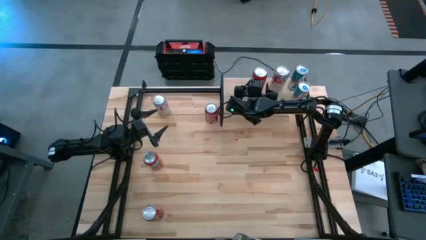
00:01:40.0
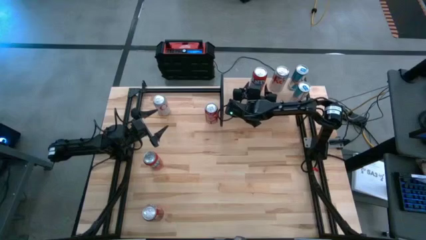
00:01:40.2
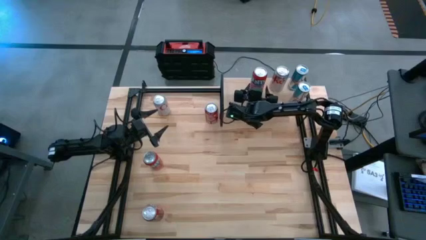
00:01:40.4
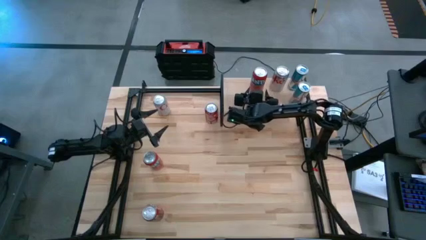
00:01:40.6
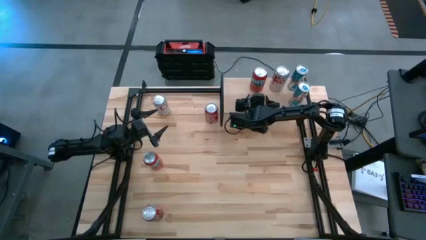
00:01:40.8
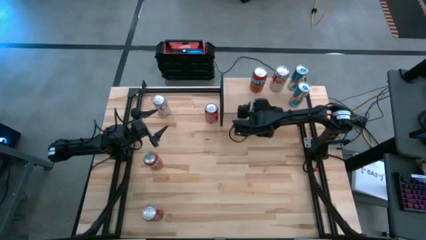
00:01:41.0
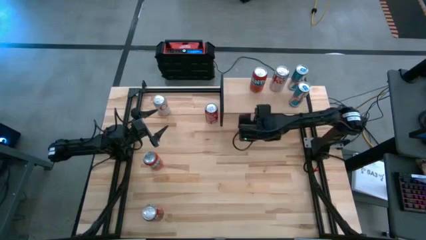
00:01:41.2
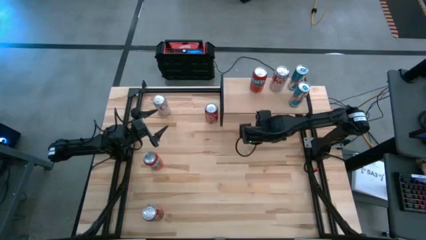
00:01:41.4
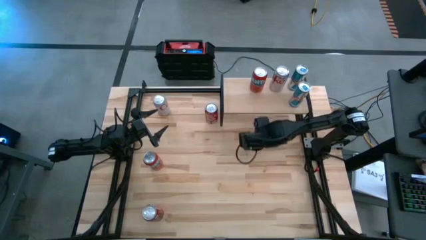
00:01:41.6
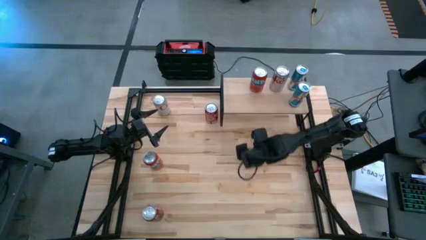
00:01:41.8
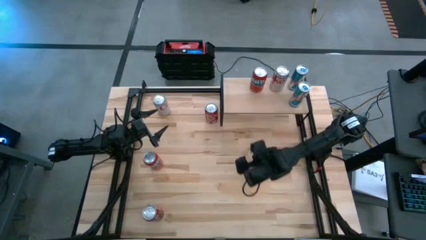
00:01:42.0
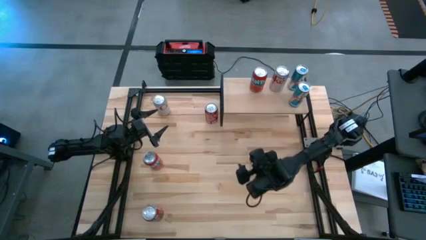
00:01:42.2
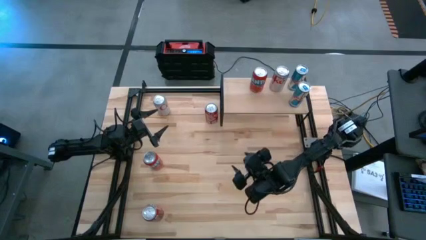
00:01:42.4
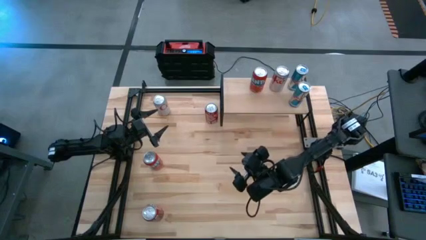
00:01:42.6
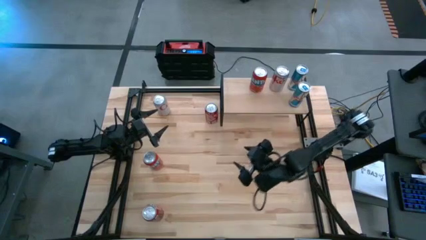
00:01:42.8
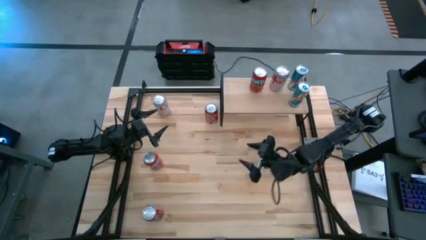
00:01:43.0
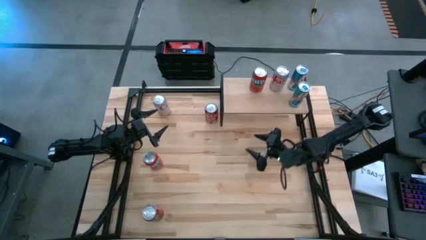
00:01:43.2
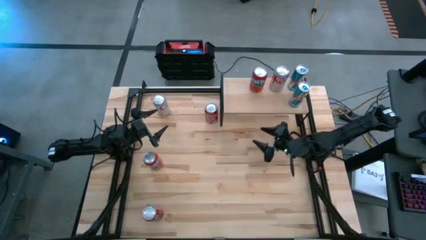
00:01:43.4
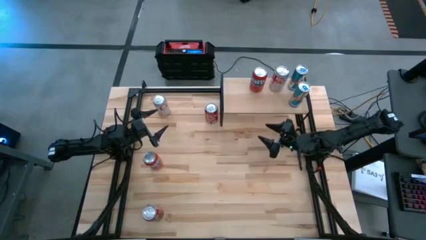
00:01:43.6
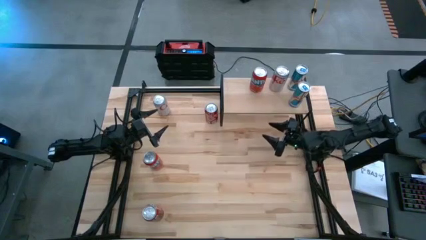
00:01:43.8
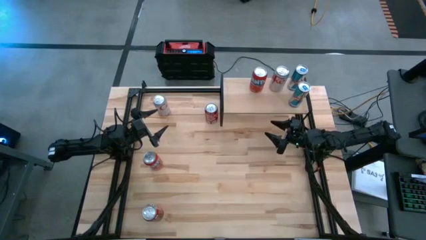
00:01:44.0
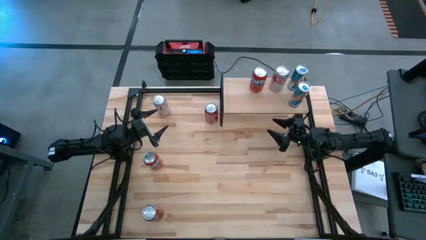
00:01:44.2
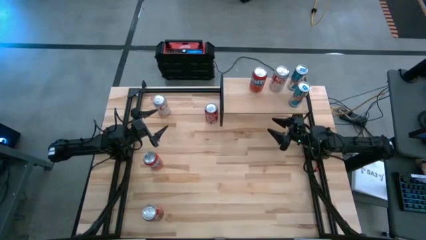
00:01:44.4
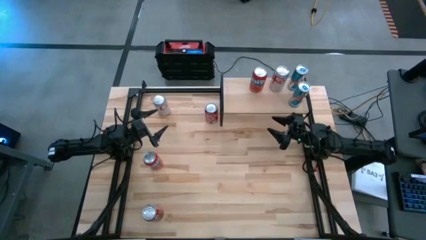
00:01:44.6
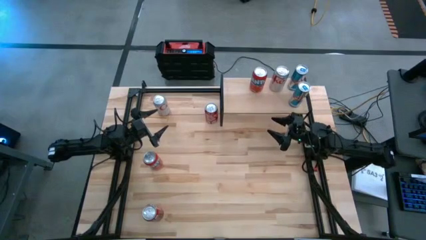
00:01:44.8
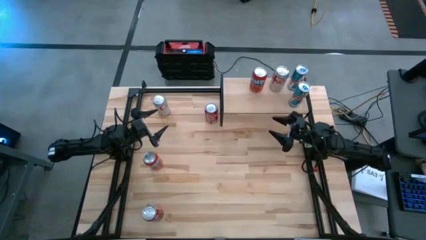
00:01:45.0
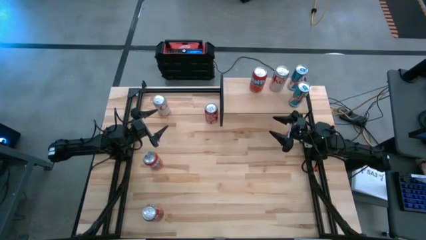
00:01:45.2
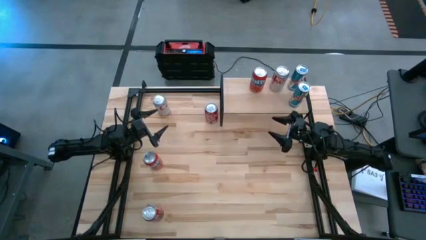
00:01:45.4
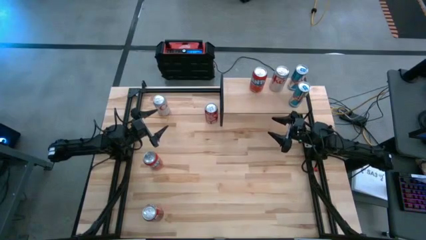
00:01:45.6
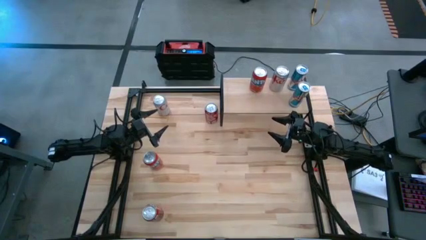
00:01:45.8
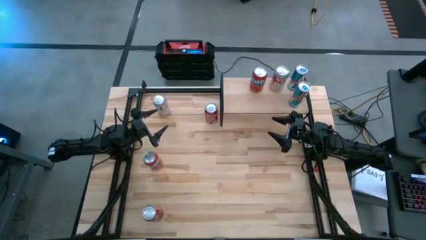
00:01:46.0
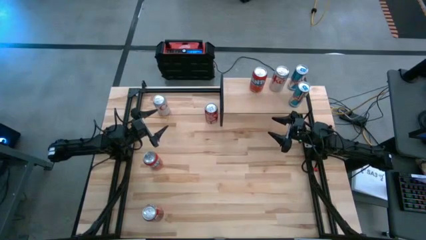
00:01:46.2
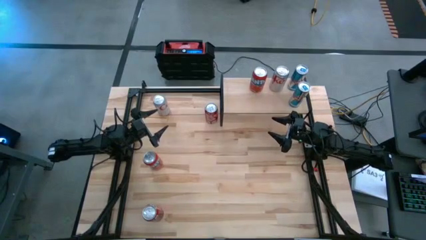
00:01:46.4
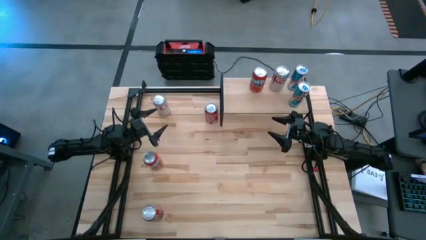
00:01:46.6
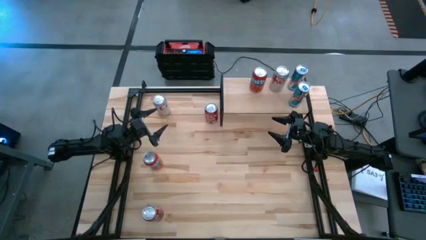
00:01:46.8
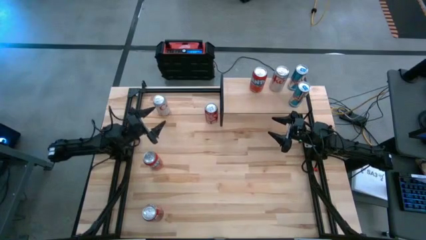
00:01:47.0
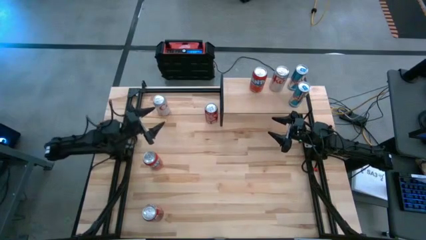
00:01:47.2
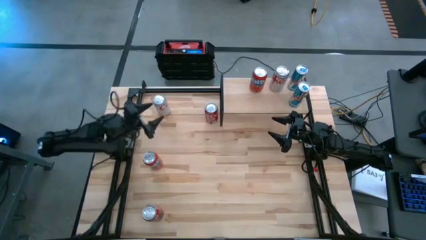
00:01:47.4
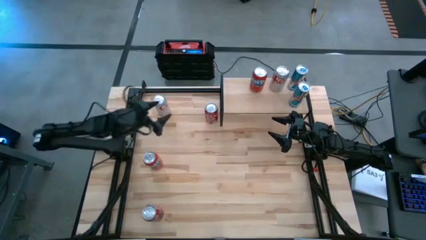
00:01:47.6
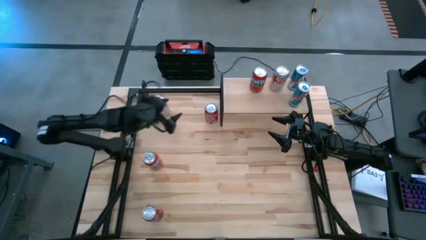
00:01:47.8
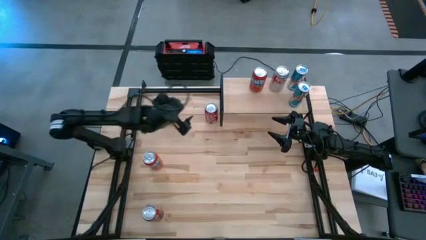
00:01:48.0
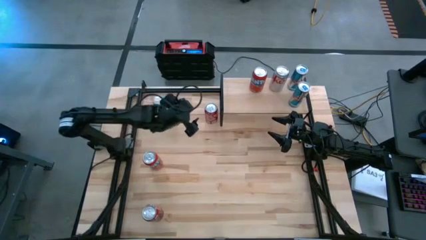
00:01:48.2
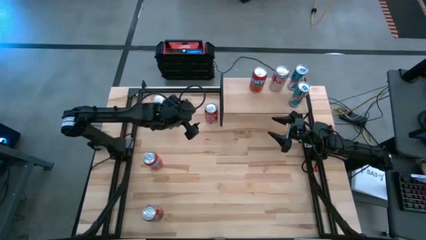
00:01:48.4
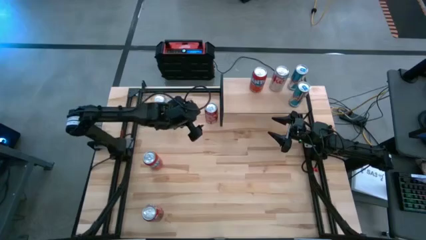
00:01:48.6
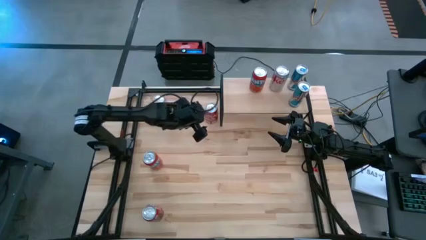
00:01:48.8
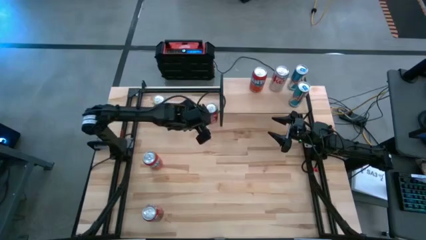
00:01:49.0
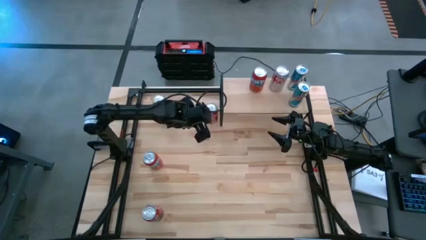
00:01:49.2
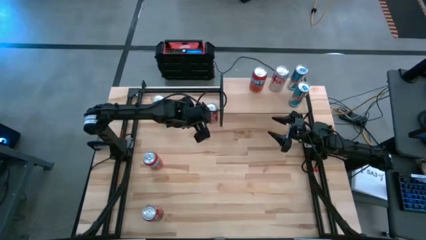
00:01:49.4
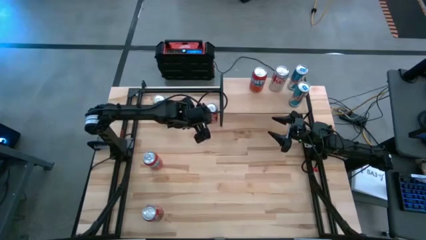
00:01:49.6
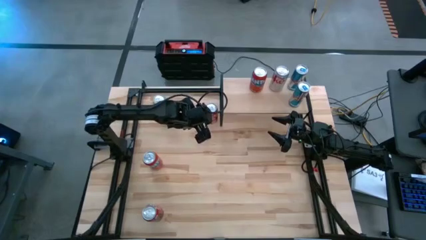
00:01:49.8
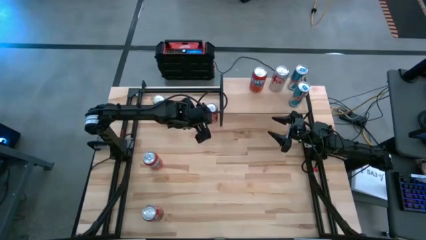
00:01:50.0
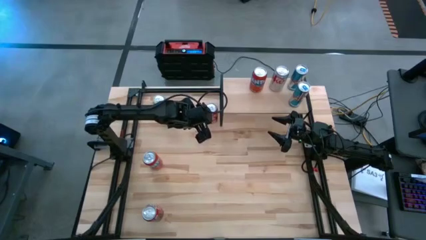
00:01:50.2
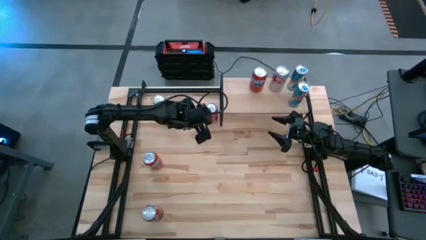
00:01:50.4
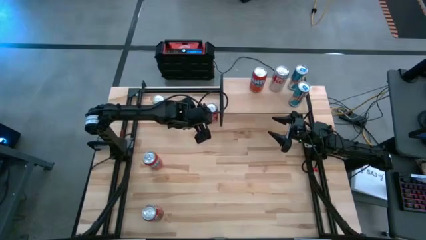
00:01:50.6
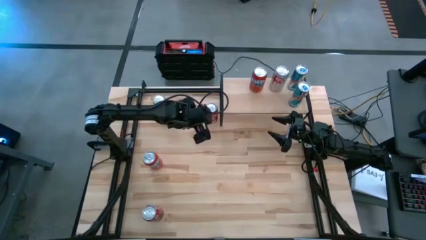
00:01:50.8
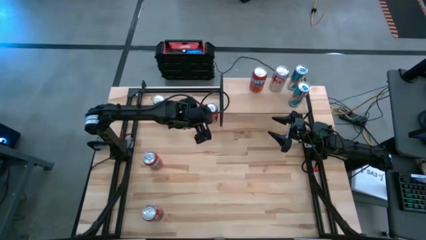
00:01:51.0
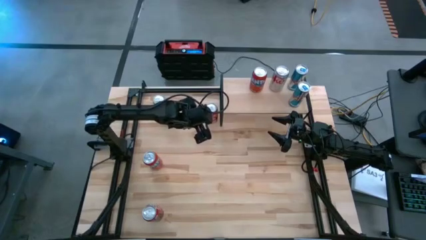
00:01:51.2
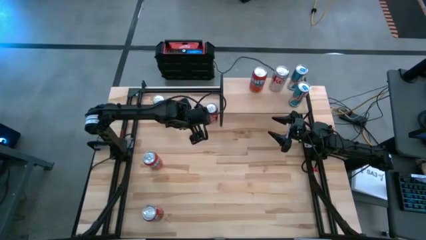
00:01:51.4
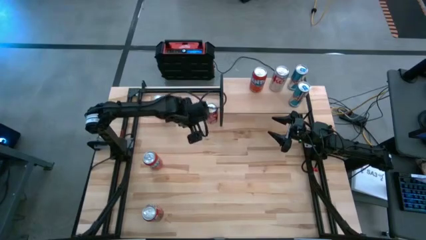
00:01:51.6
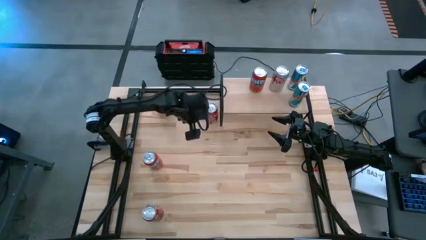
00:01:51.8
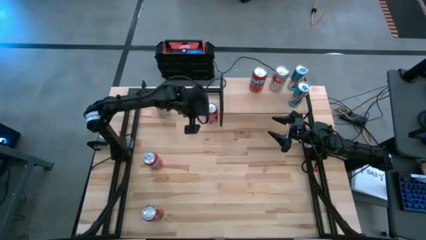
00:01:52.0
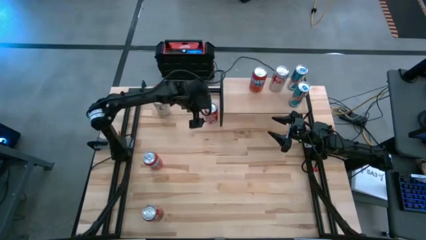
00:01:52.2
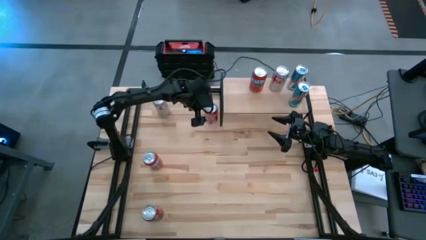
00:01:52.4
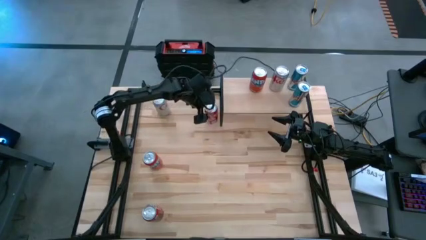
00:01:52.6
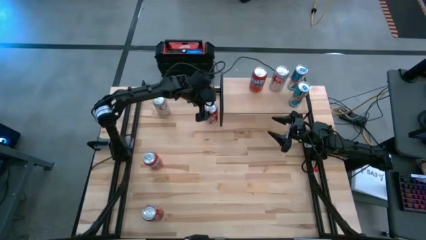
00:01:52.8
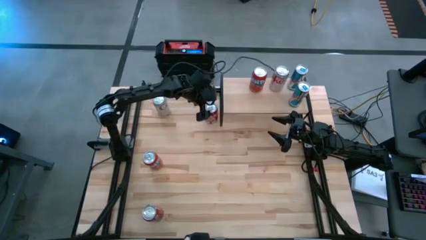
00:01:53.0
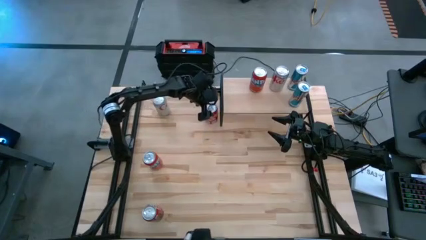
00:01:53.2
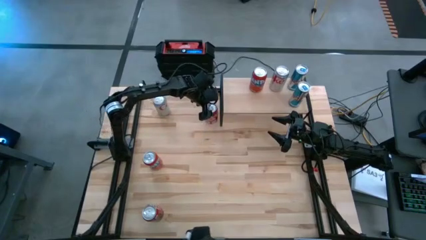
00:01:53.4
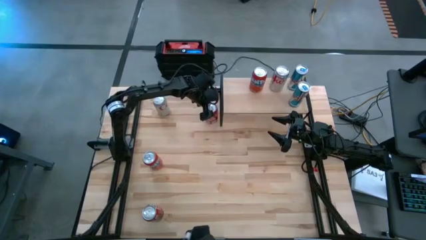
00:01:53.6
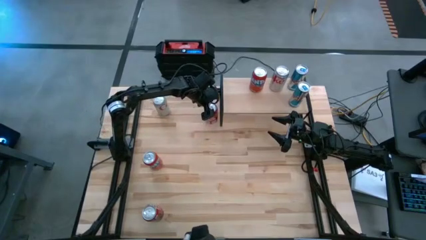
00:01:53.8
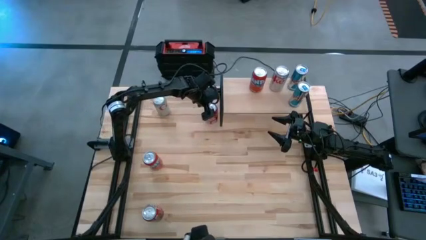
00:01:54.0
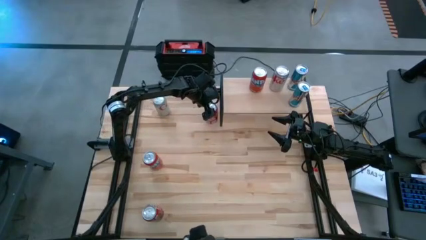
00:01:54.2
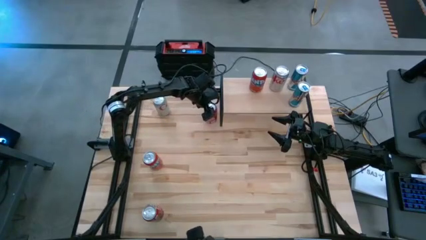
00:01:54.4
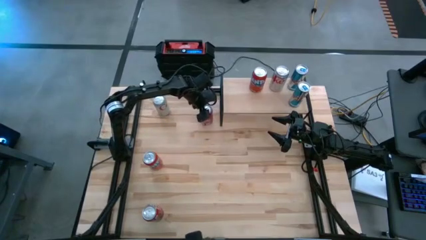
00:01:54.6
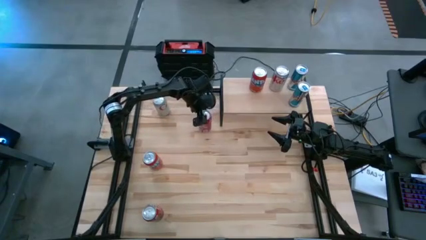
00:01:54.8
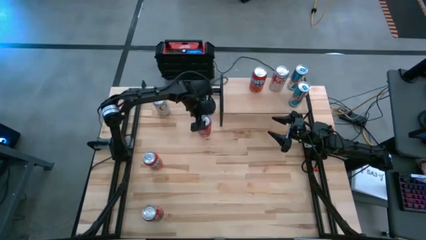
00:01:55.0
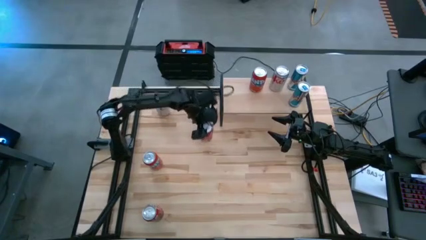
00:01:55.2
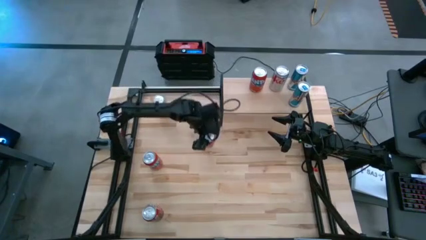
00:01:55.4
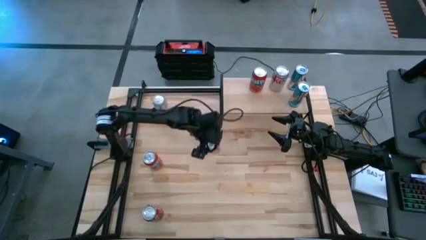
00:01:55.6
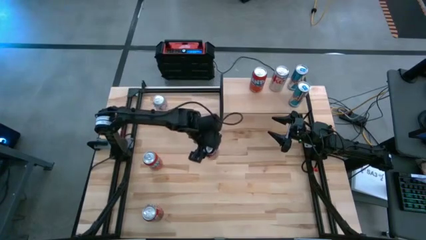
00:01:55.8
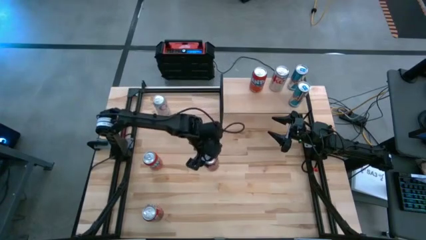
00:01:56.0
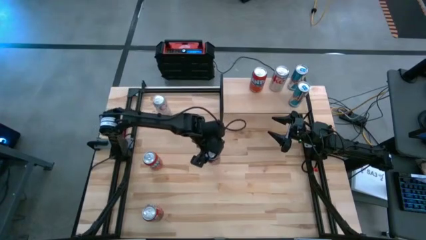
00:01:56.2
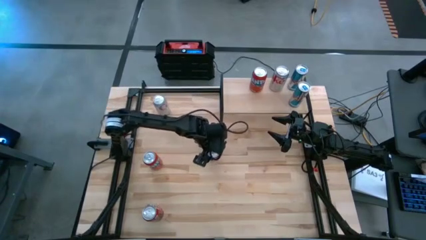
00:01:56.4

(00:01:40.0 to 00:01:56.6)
Task: Place canned beverage on shelf
Put the top red white soda can on the shelf

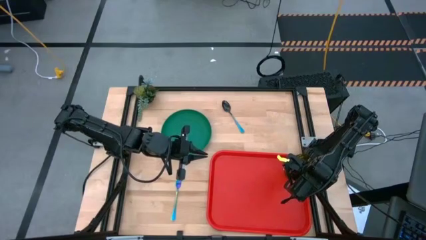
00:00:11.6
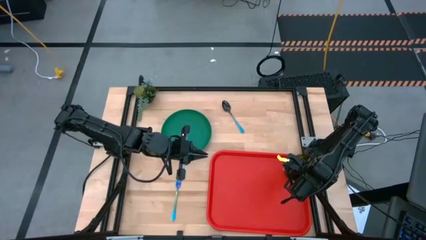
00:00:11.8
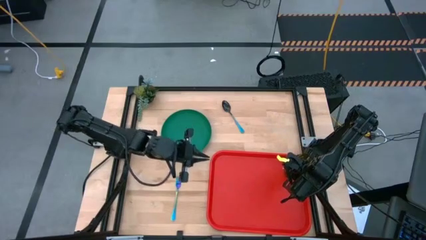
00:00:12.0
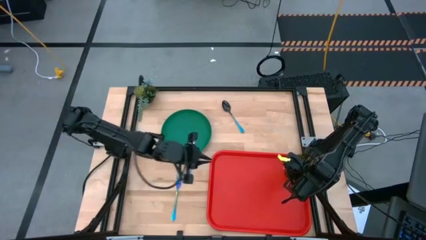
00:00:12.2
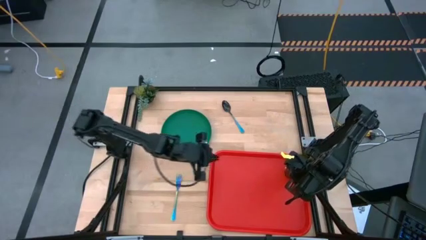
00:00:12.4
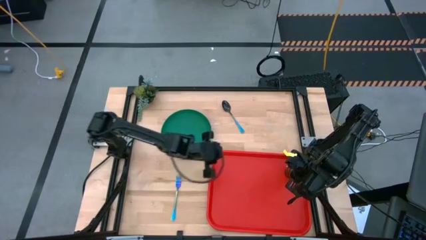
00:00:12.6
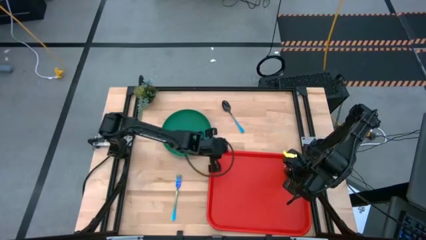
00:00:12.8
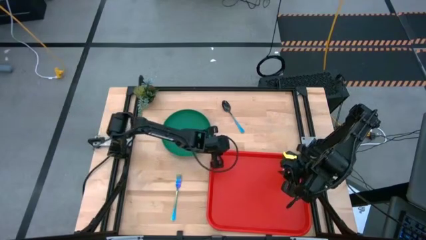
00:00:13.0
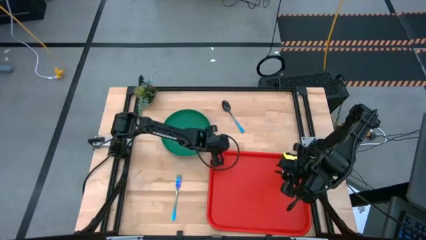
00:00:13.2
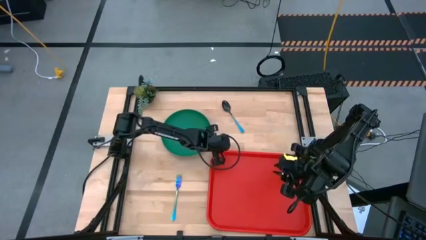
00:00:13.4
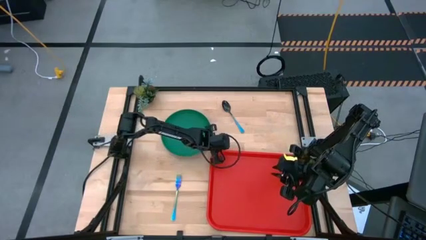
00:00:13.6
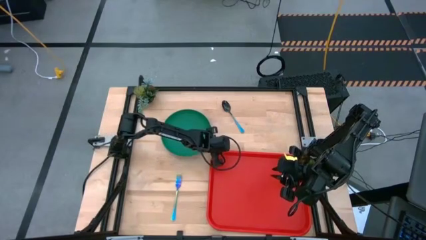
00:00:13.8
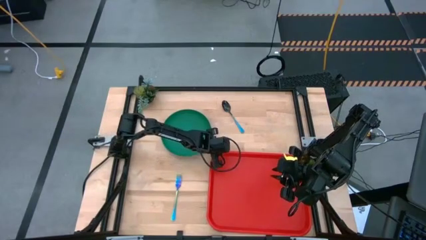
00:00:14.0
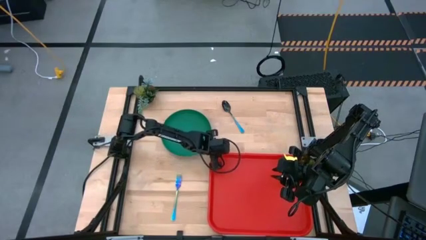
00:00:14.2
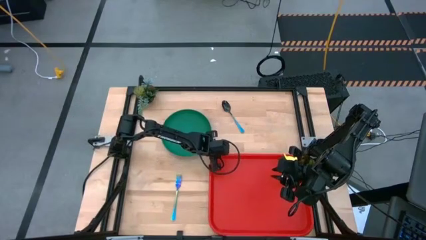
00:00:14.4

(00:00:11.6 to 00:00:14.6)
Task: Pick and place plate/cup/fork/spoon on tray
Adjust the red tray
